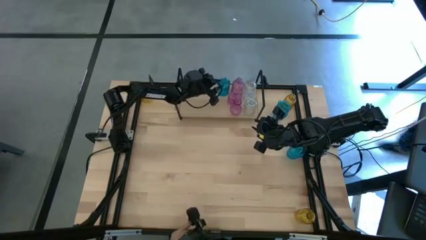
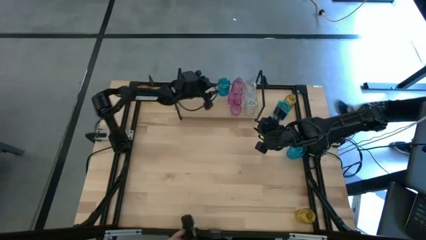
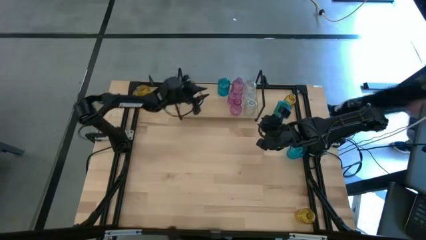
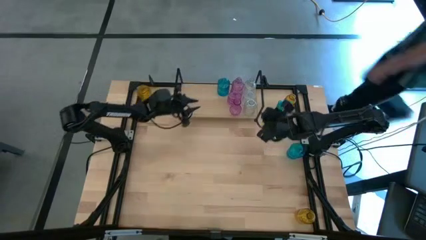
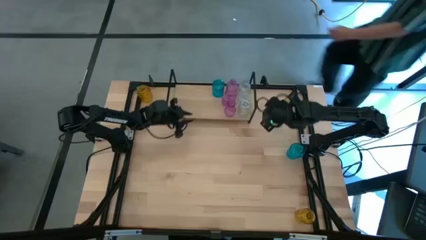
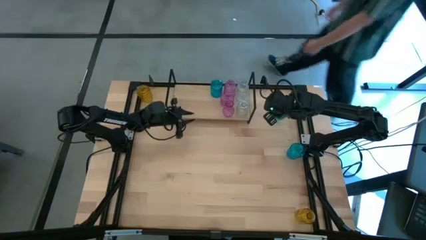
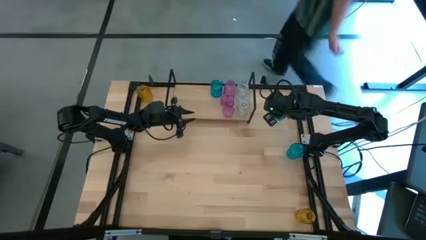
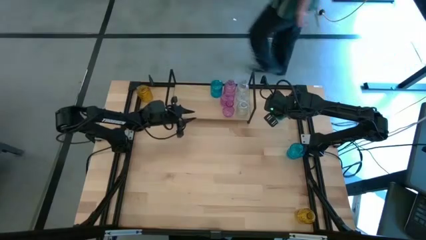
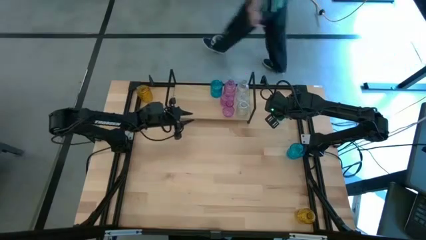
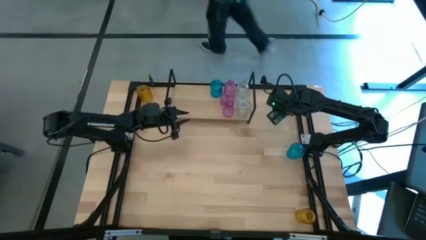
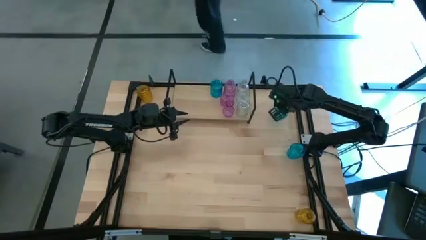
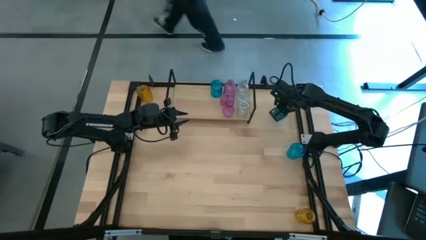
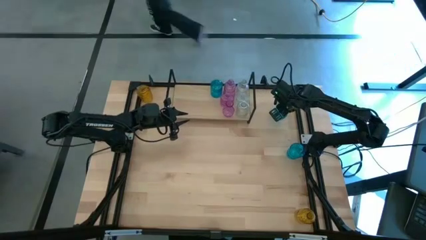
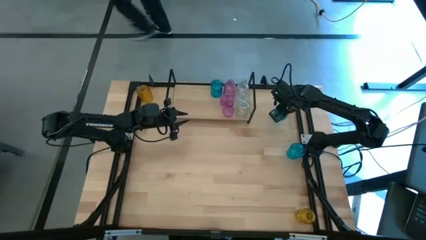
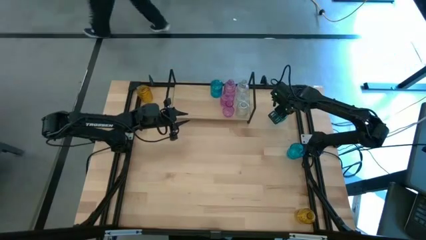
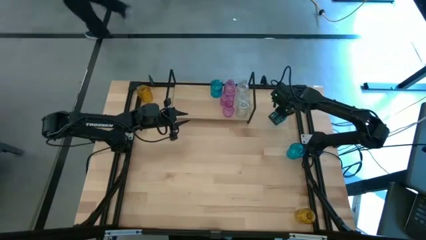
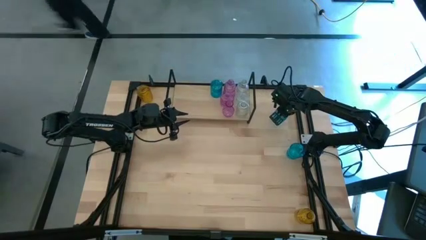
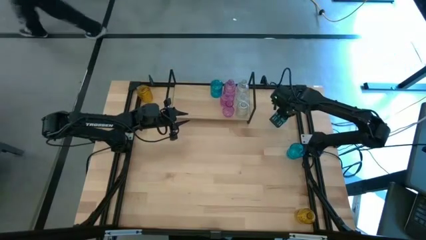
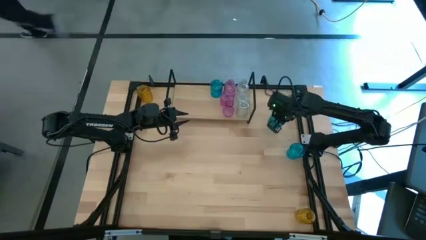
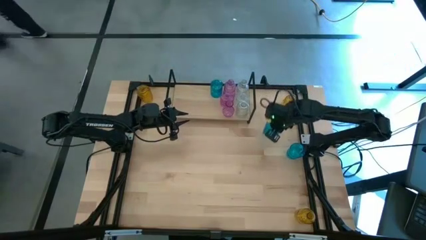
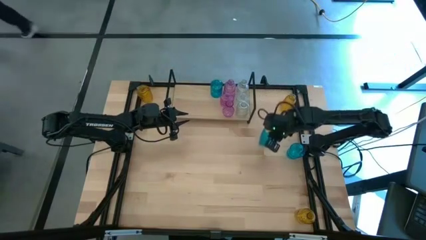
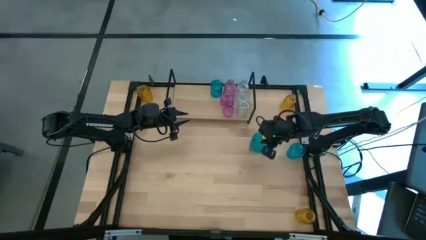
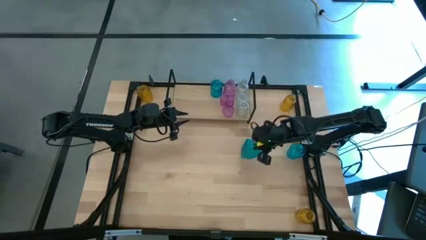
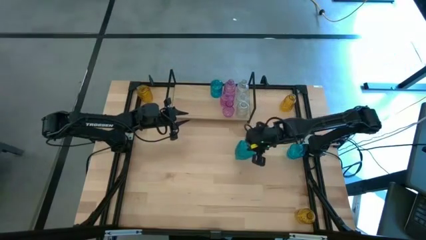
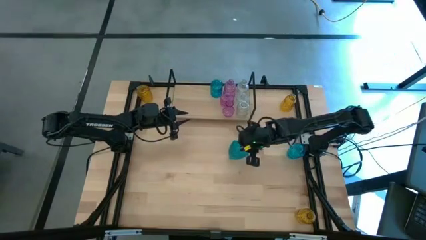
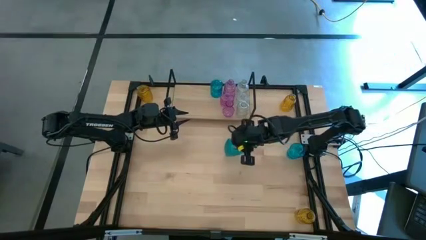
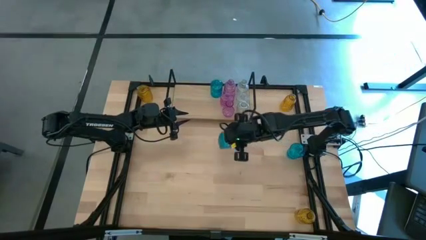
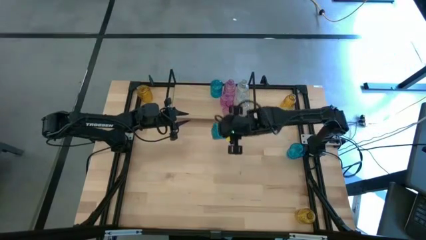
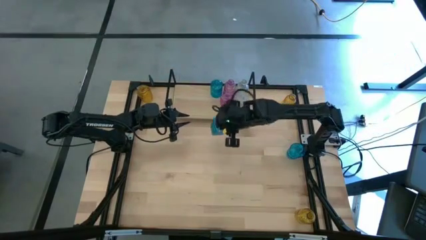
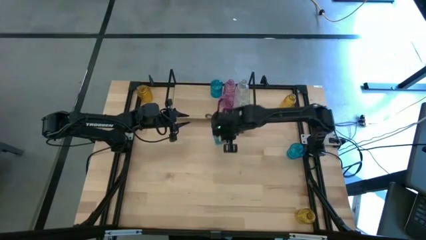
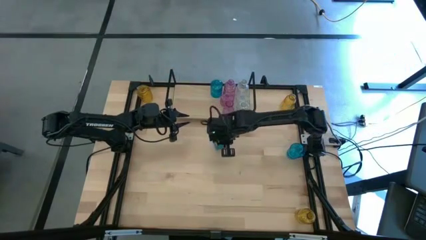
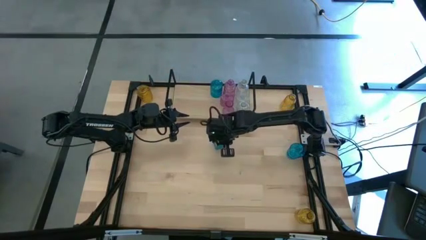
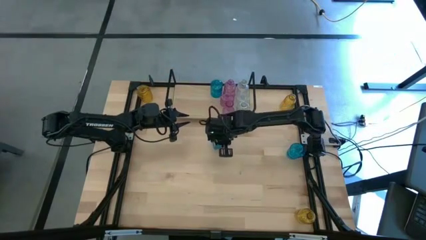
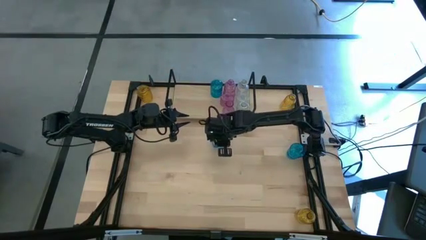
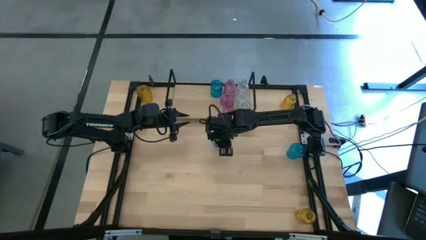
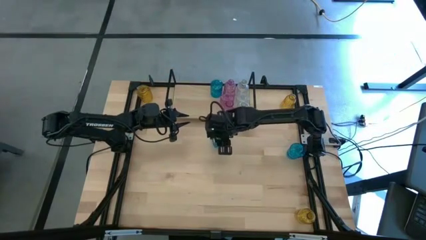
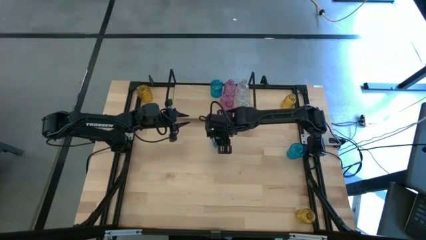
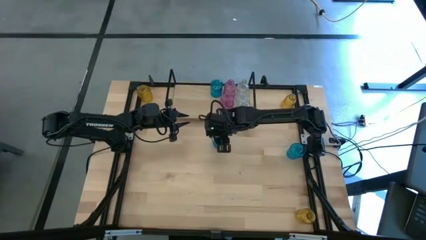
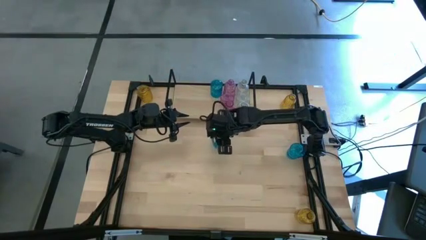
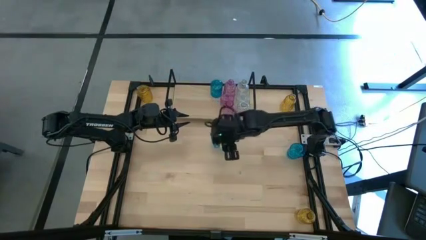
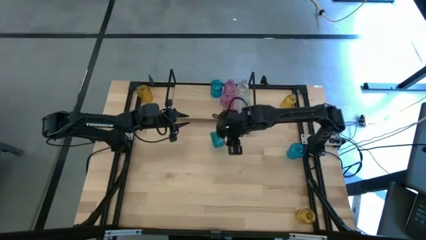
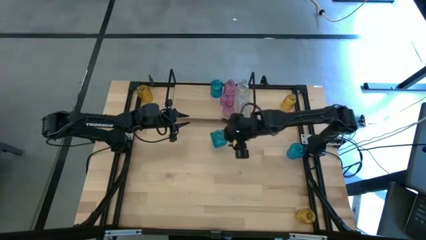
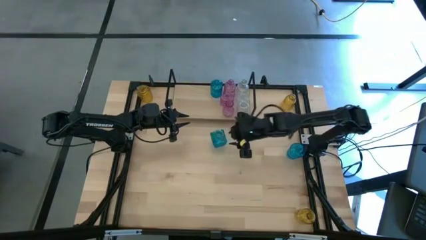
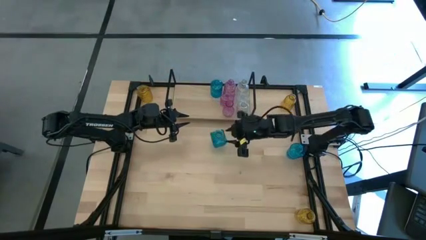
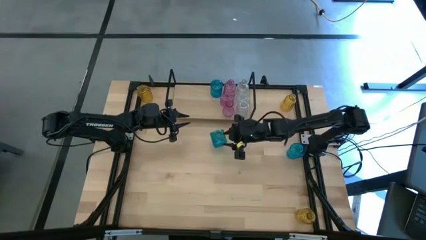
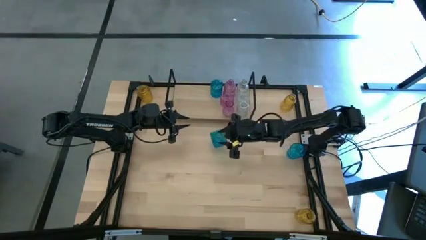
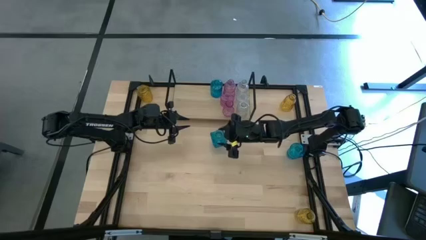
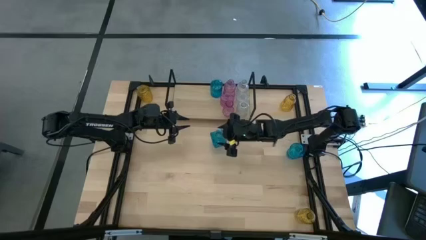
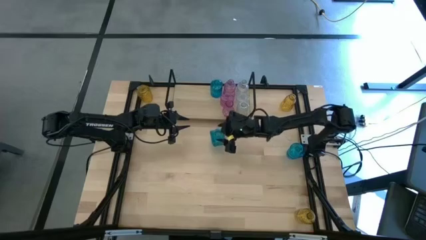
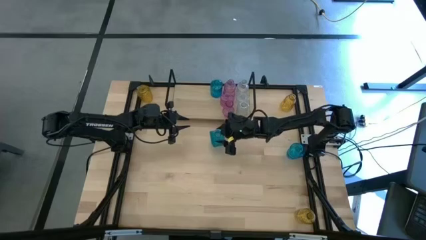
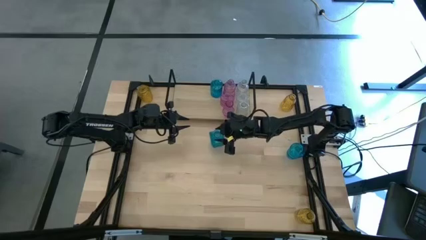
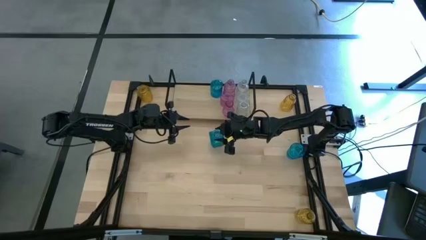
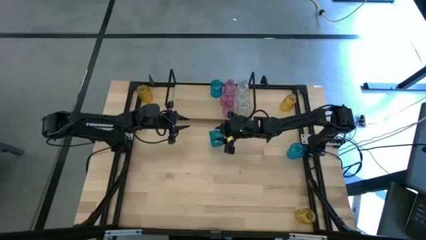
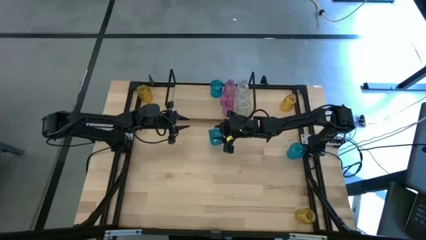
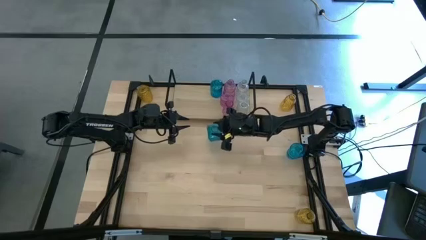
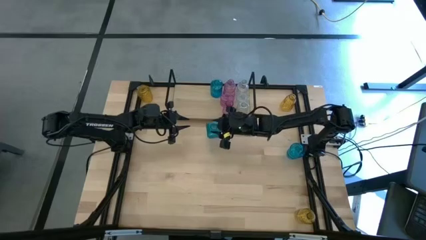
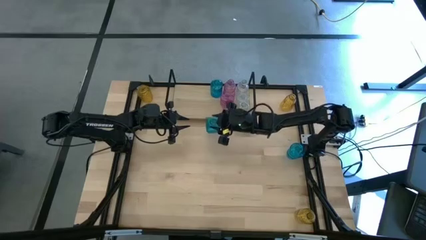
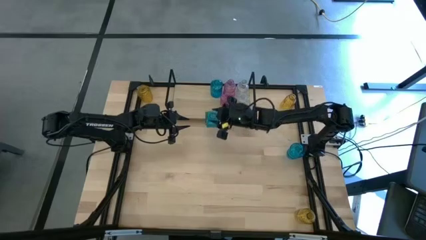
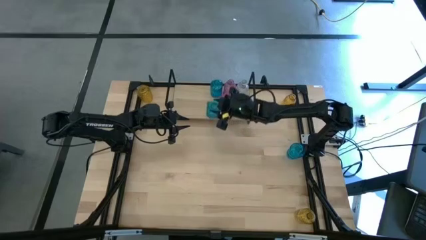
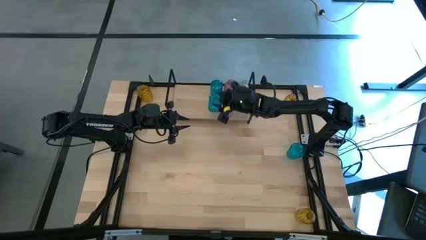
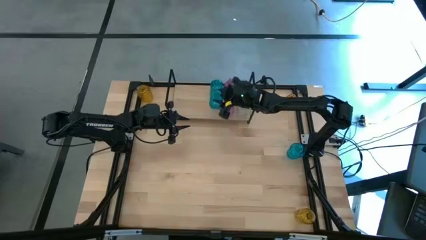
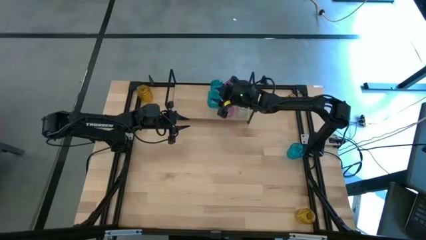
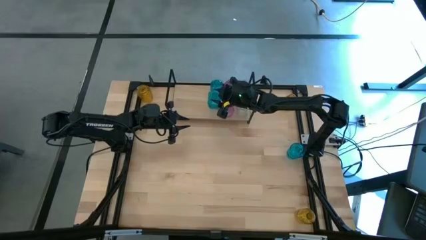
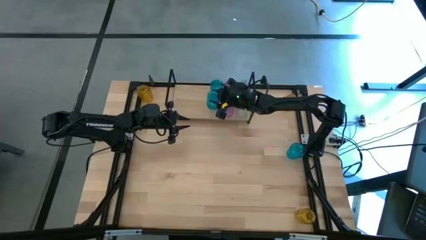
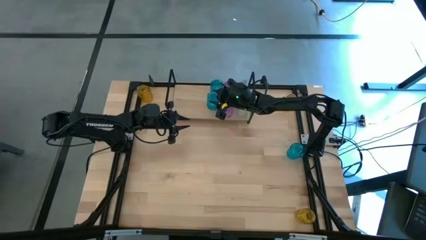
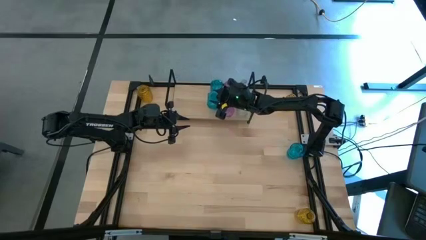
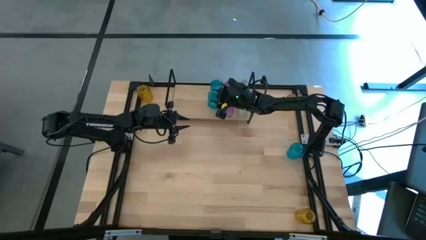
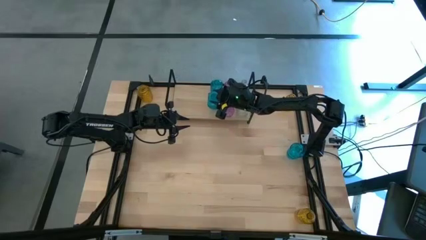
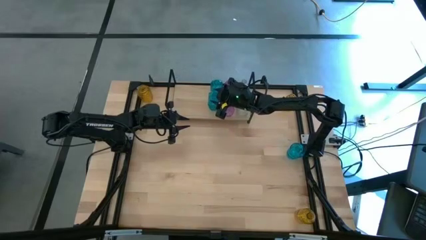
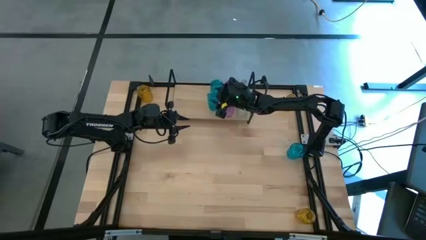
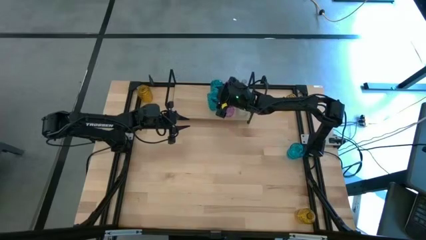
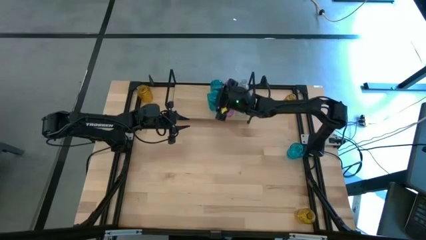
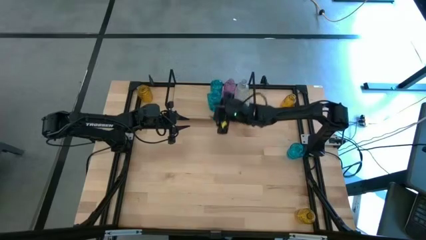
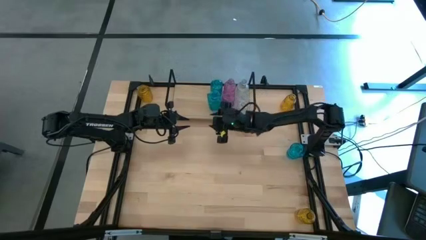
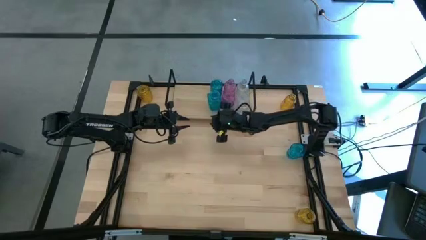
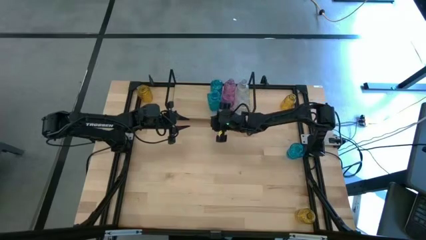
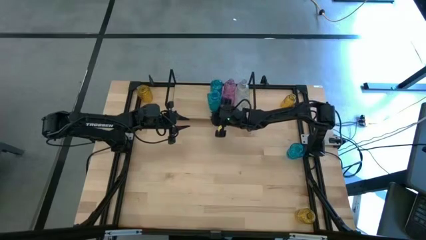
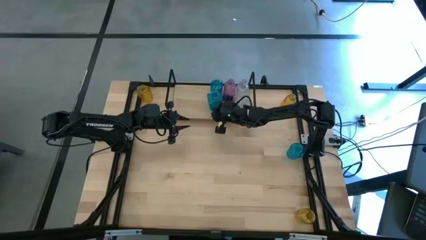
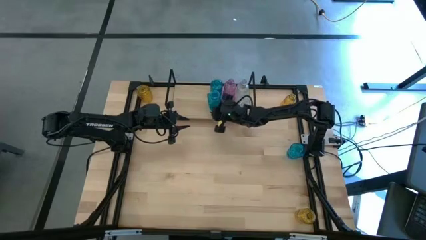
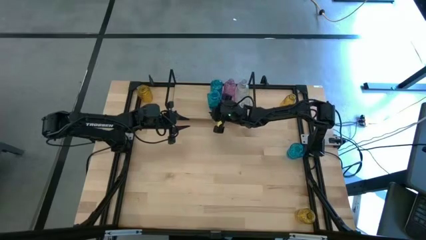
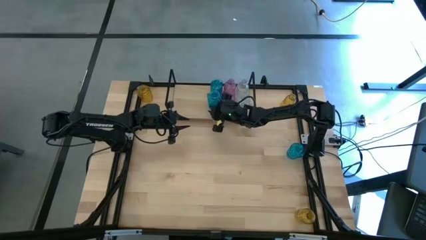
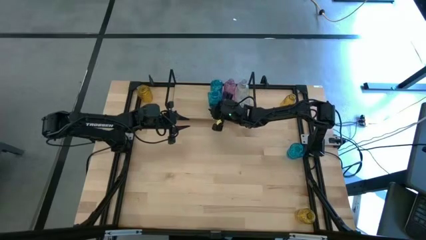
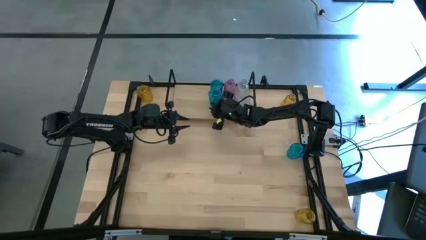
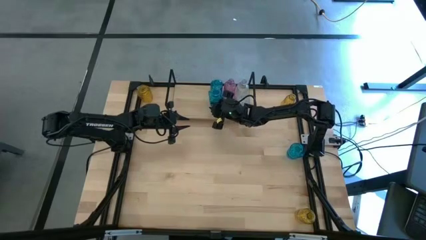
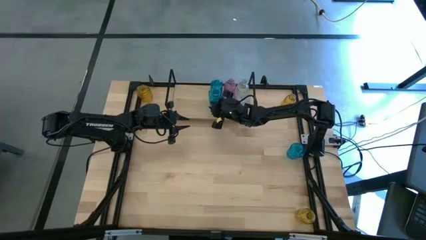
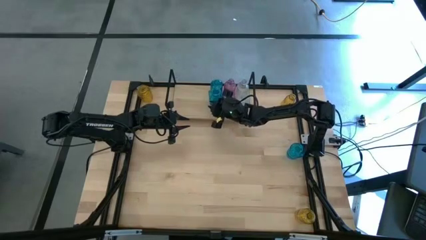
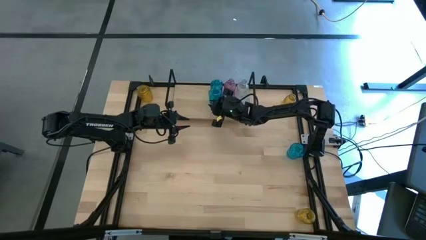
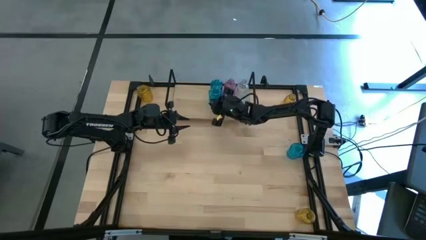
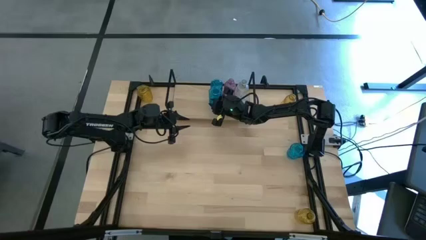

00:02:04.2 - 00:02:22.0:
Task: sort vases onto shelf
Put the top blue vase on the shelf aligned with the other blue vase
